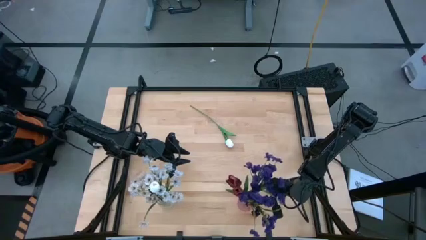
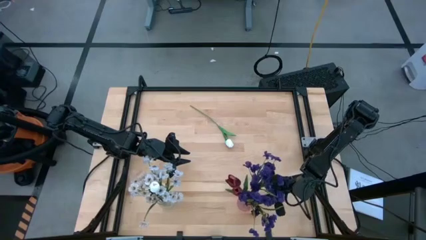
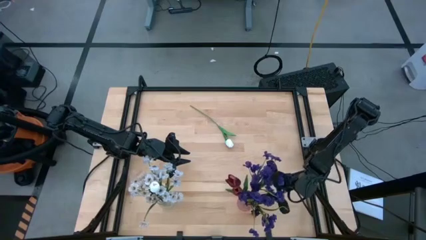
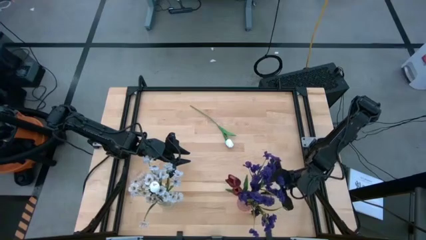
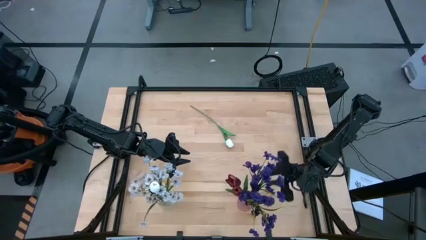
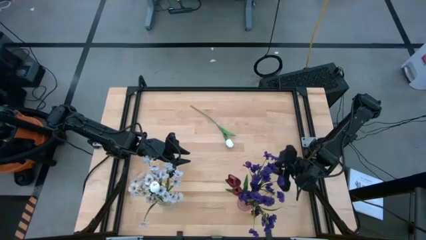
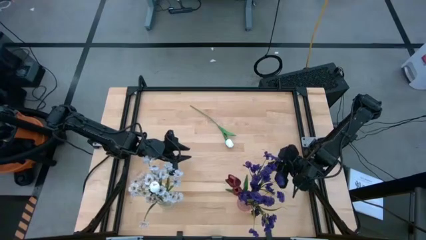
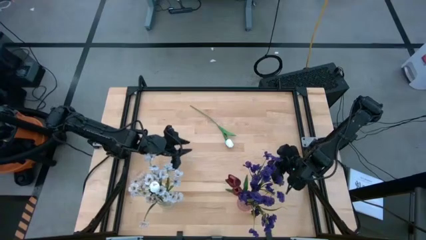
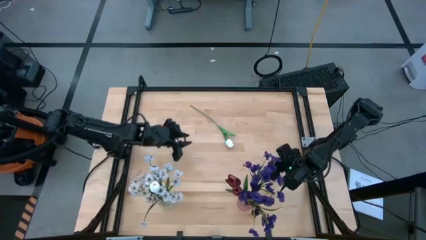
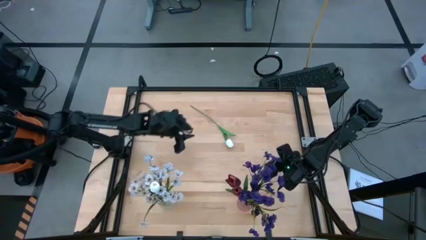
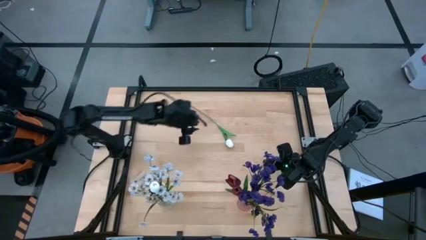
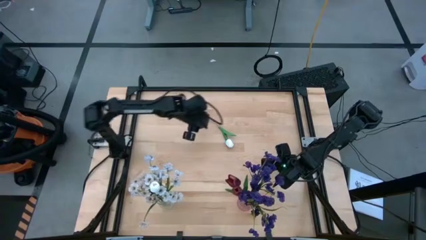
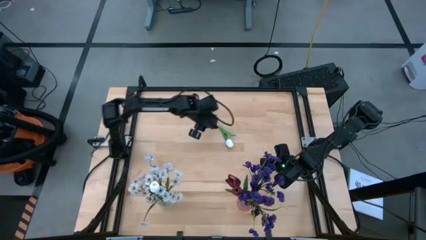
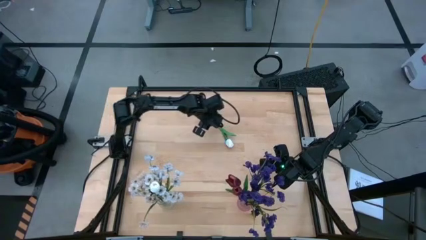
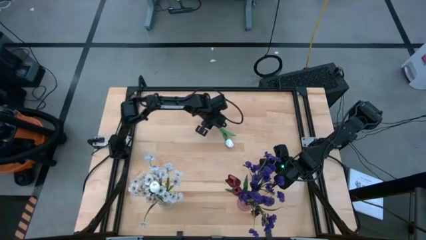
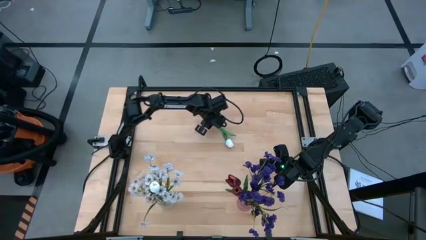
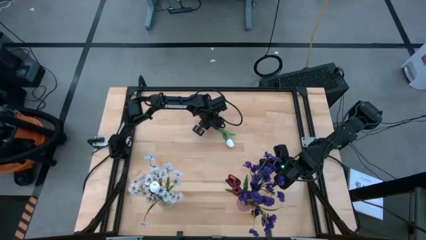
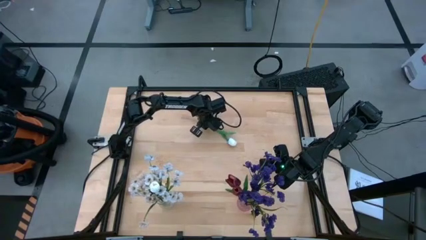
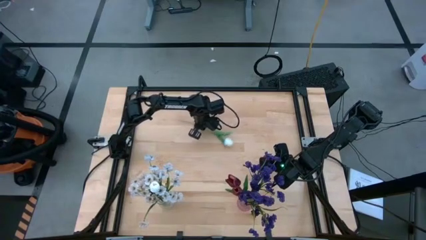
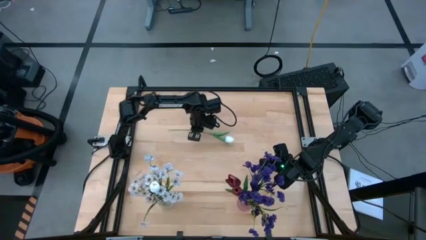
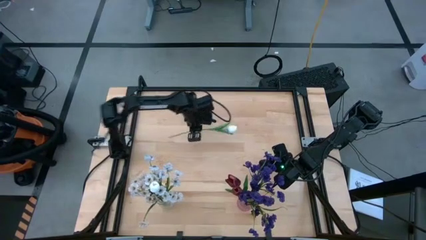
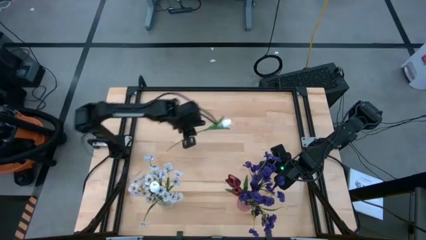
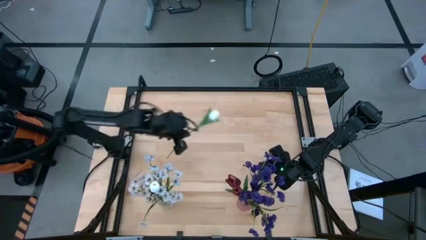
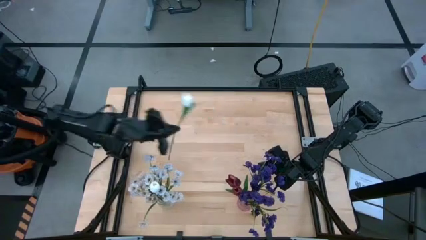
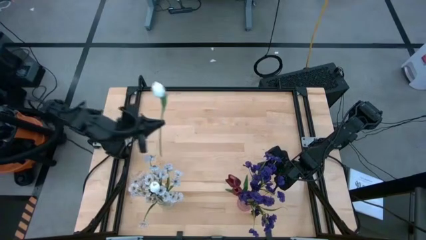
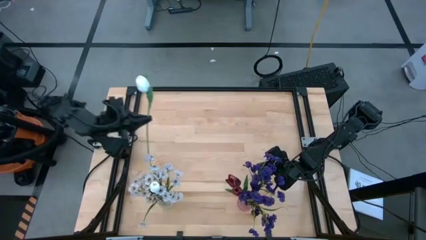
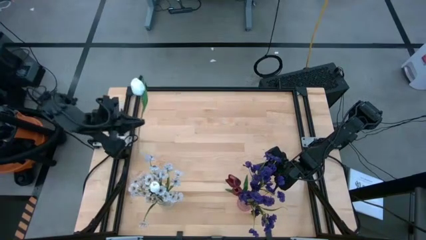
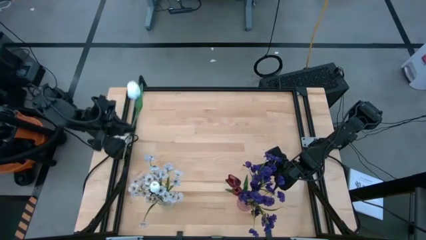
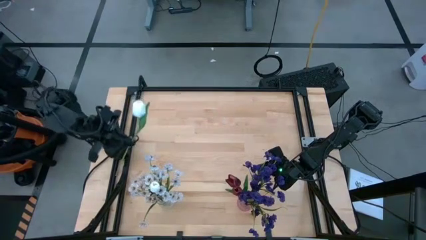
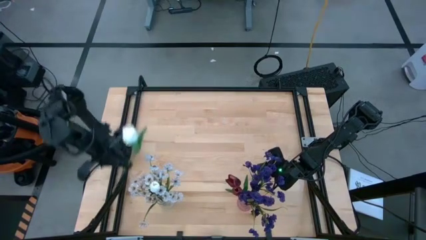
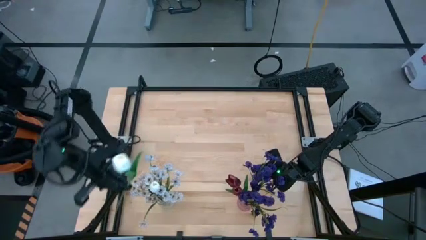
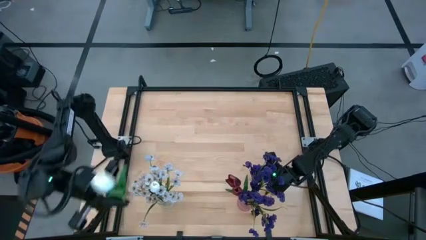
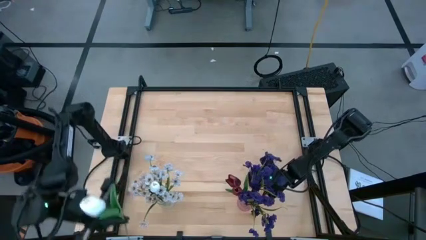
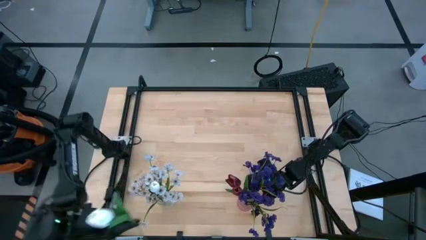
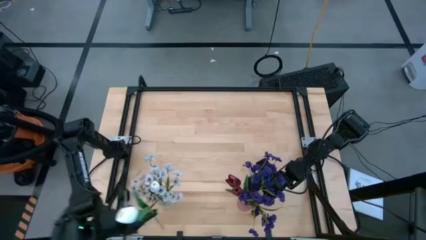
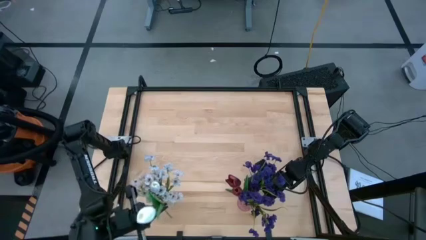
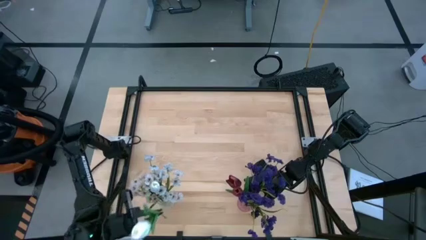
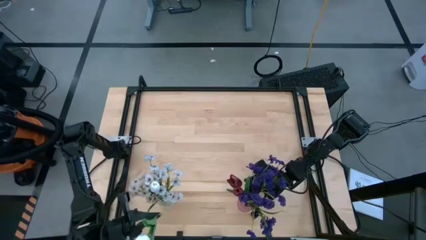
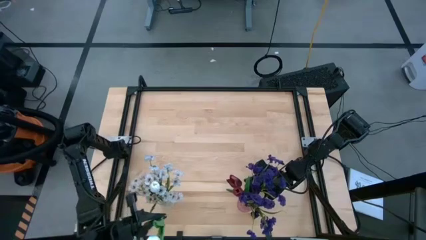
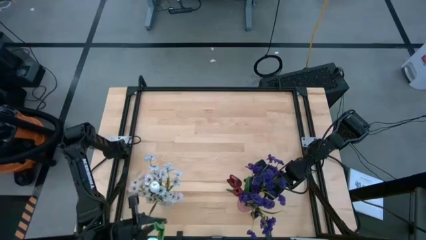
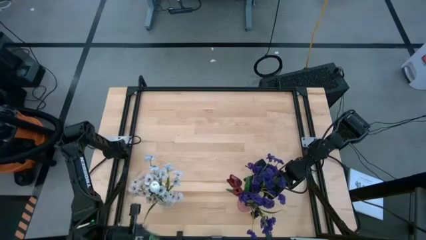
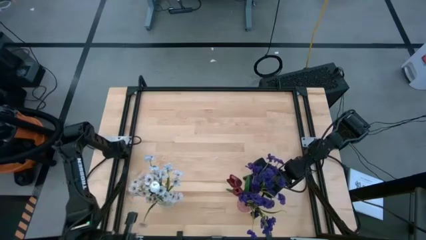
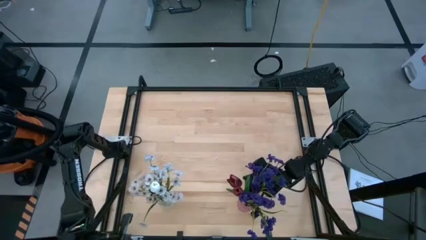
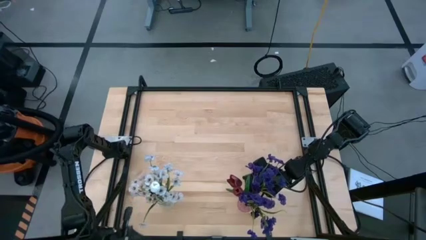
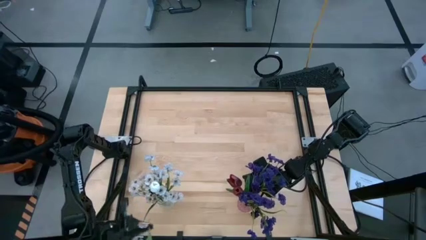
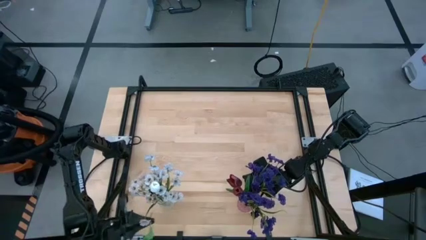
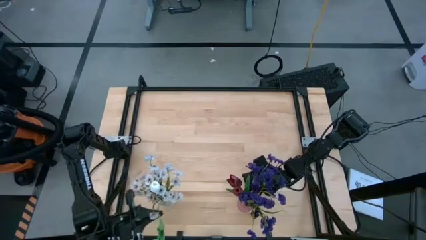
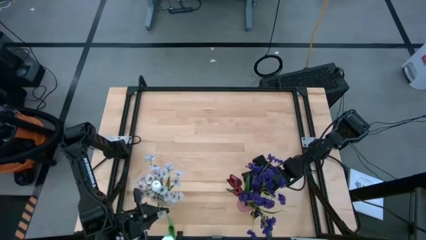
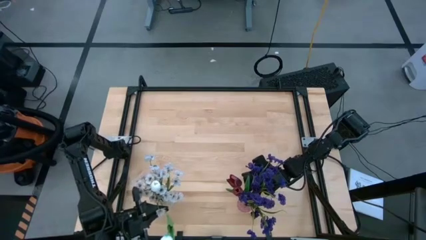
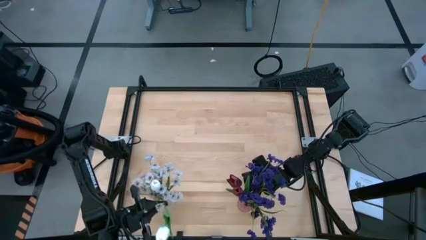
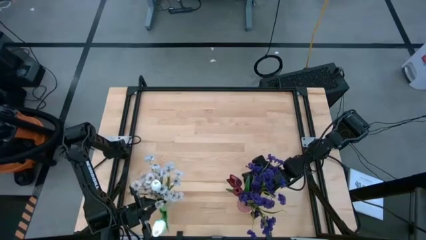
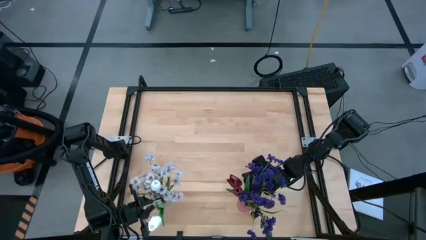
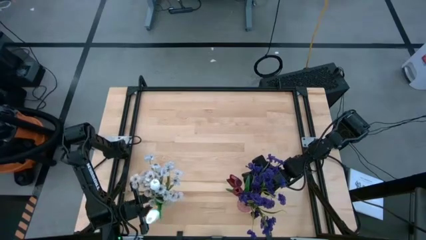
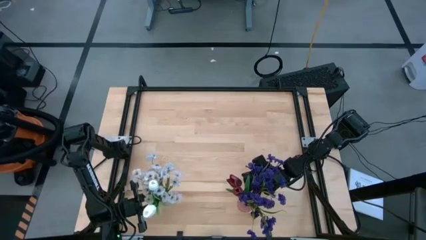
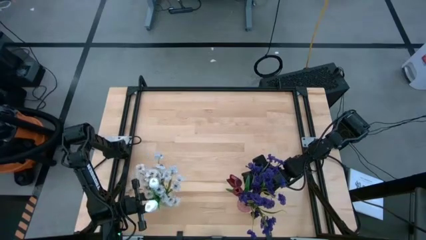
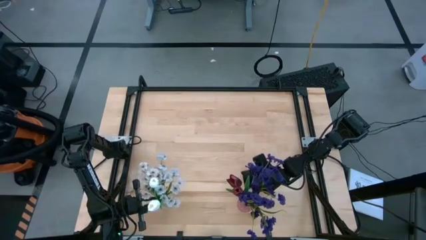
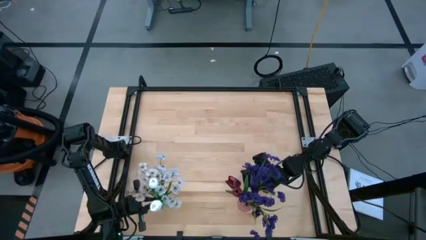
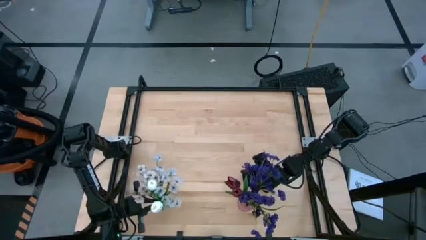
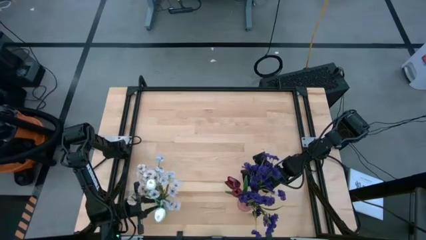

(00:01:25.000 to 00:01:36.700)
Task: Sort flowers into vase by color
Put the white tulip into the transparent vase

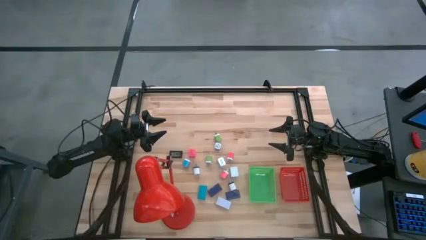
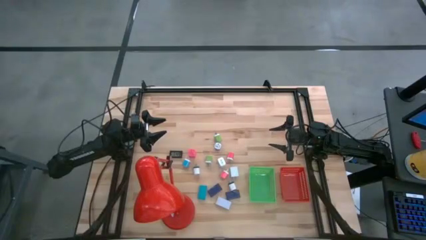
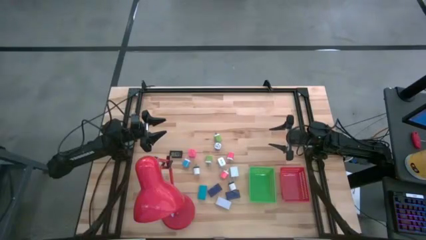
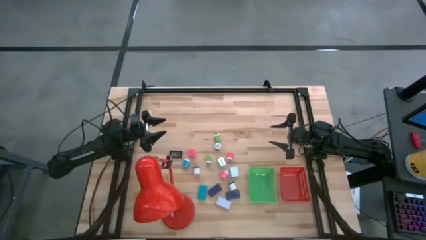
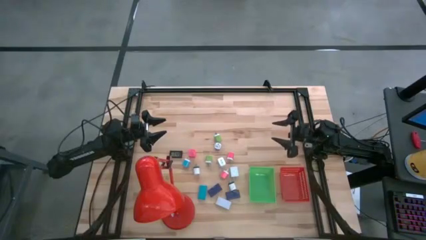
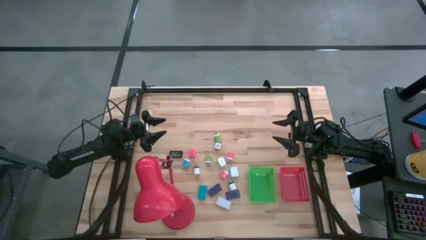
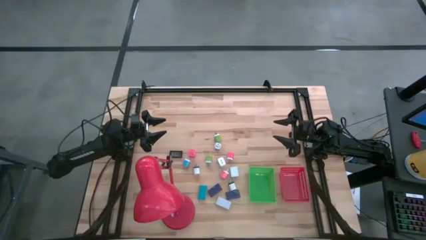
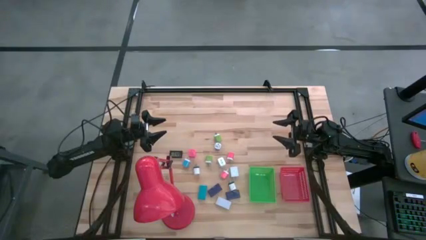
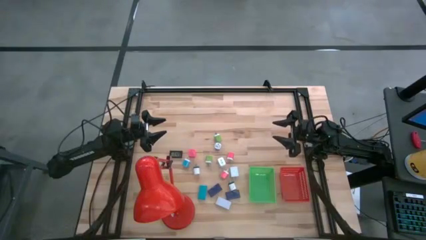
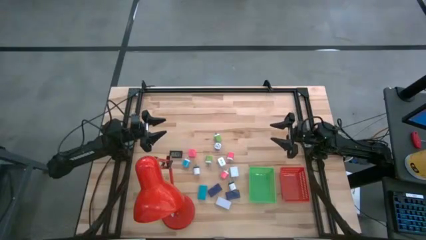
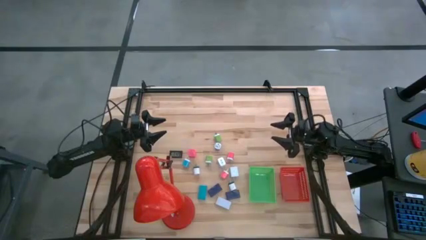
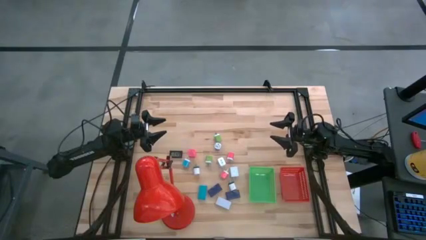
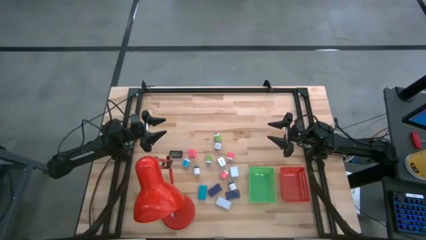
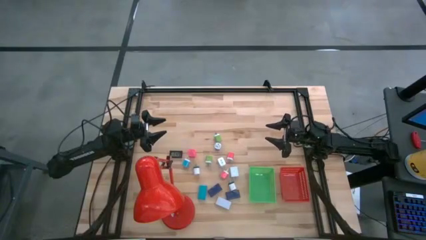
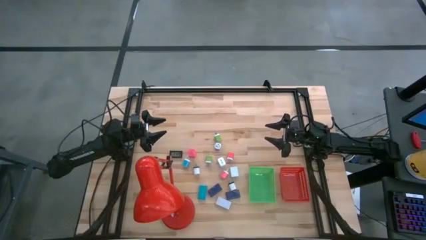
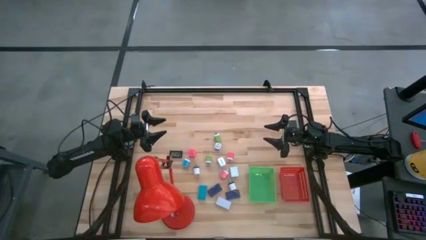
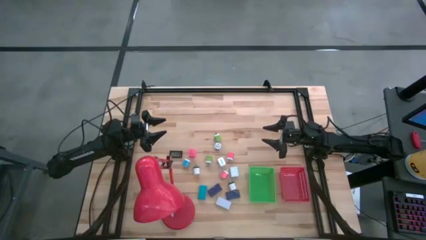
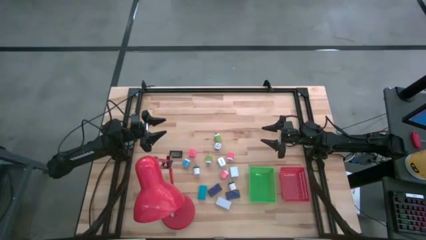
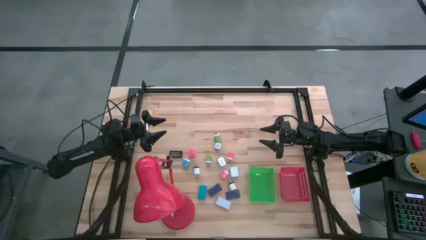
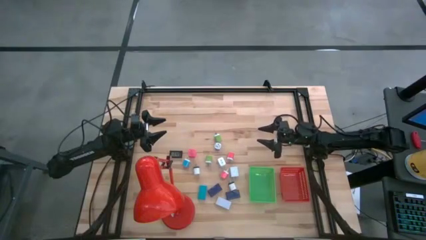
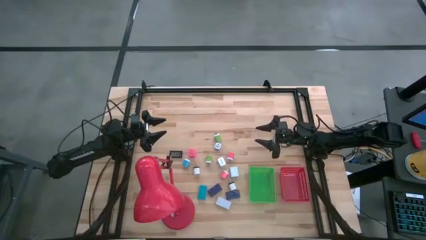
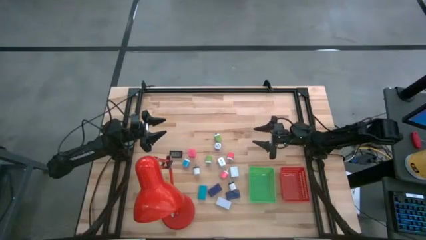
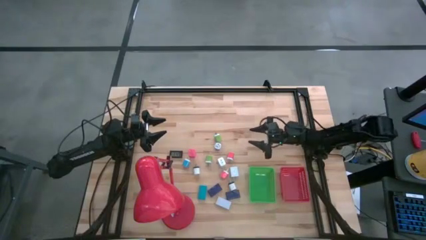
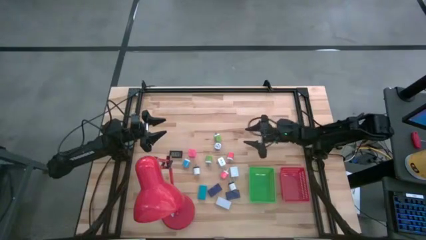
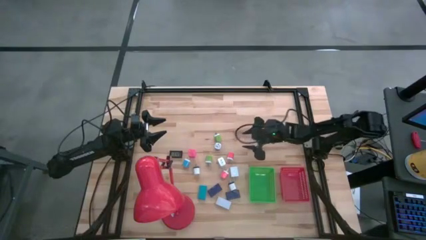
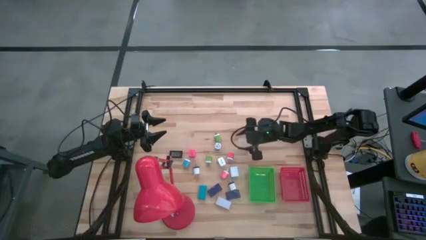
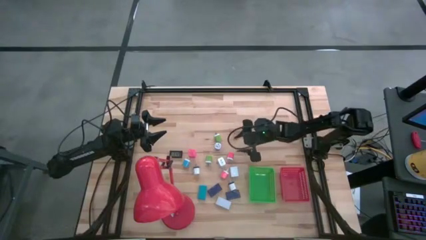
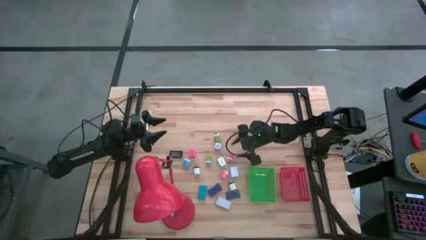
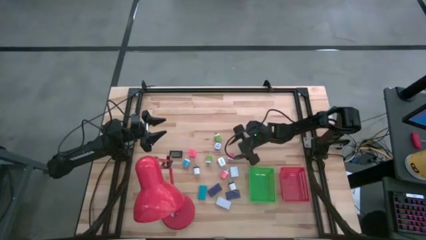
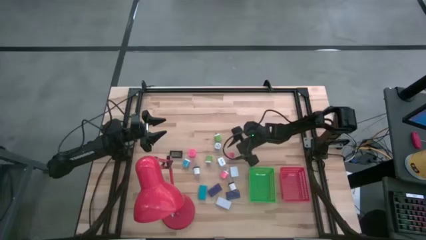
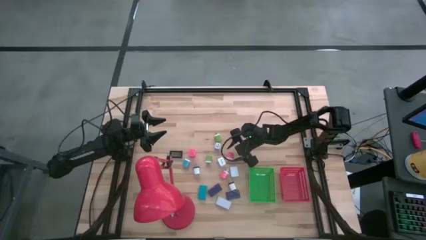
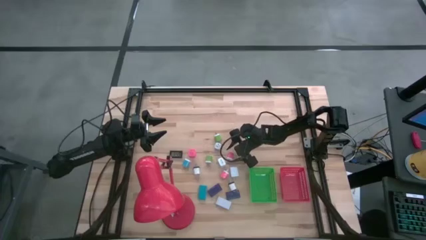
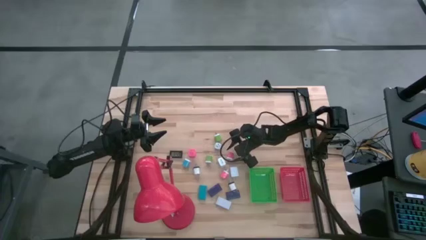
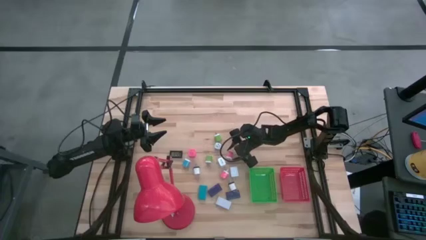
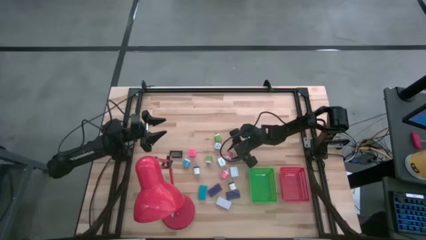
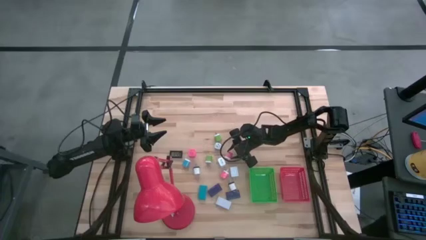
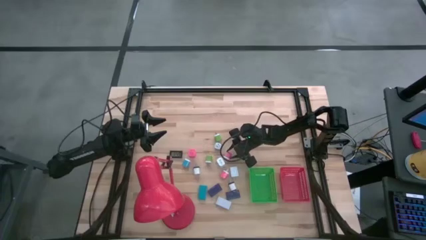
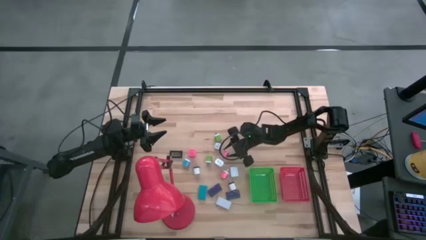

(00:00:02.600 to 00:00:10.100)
Task: Pick & Place Office items
Put the pink charger adapter into the green basket
